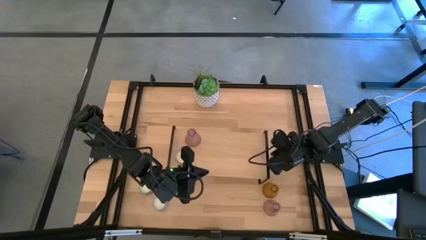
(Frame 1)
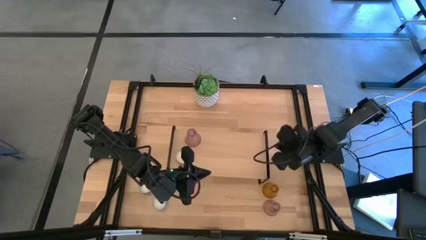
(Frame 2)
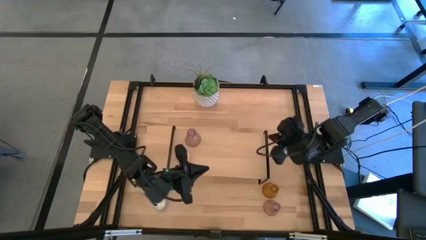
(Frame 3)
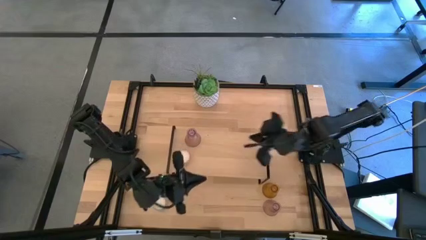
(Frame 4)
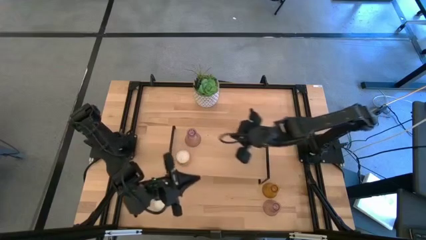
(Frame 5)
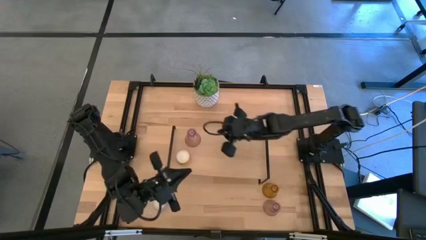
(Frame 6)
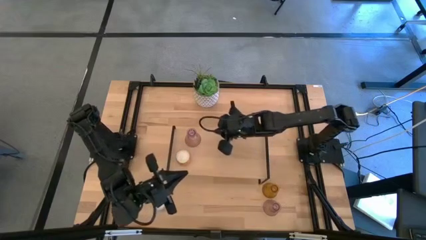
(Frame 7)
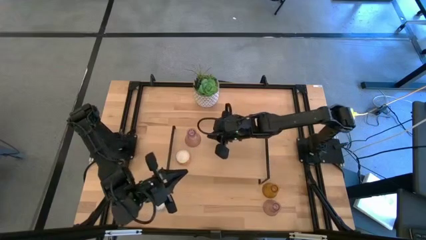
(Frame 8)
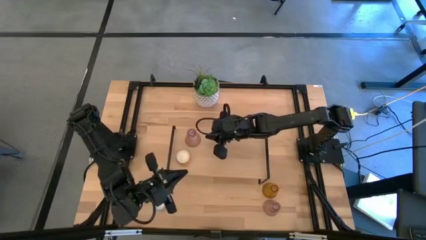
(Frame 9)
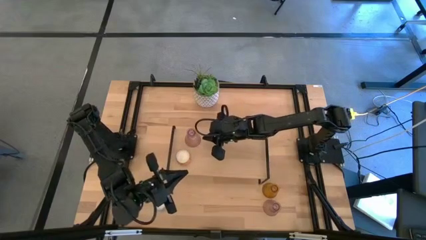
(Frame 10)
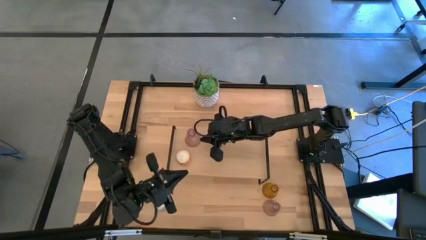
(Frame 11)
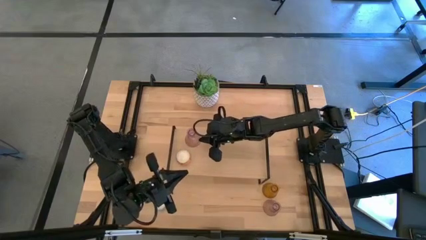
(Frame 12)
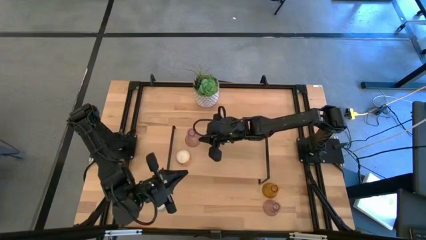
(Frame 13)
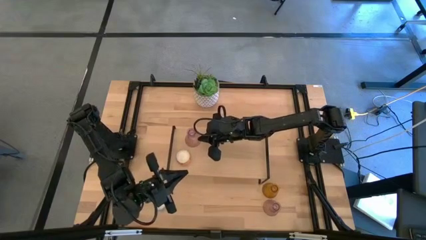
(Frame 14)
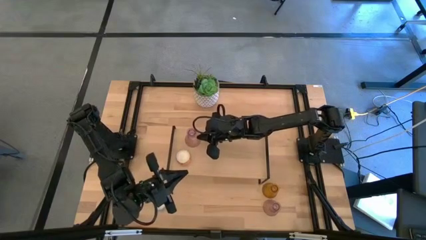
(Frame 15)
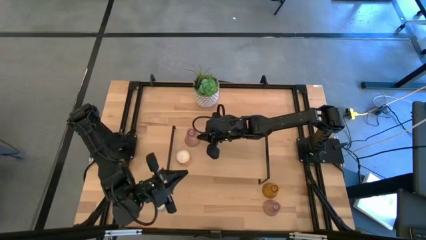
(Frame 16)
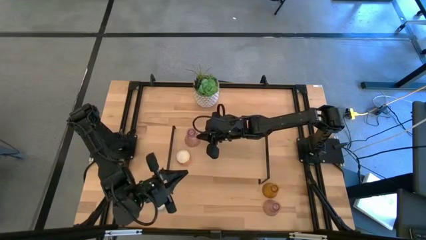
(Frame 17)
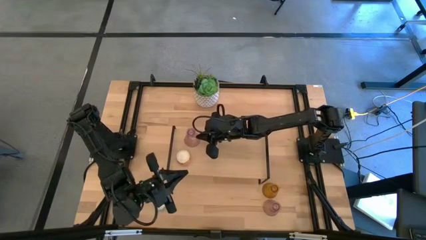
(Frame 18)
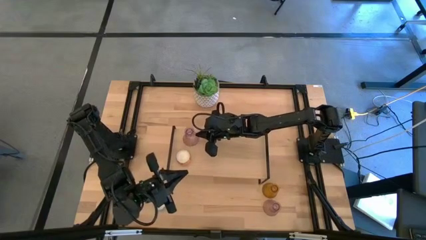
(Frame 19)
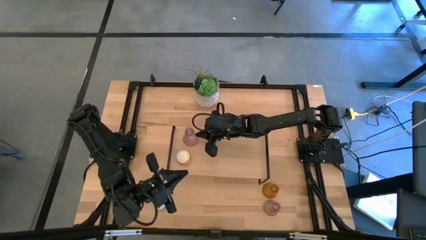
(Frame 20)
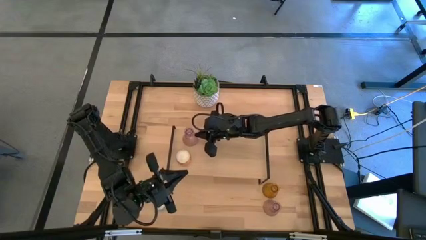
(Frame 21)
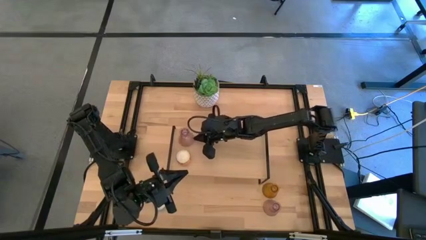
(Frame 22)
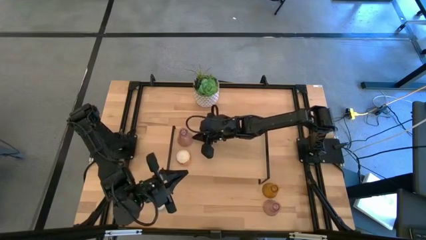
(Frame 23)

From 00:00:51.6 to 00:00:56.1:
Task: Pick & Place candle stick holders
Adjust the pink glass handle holder

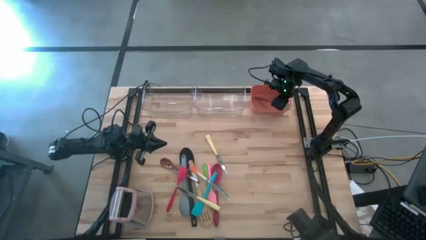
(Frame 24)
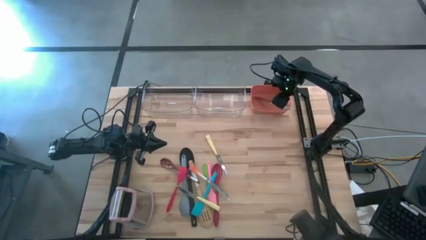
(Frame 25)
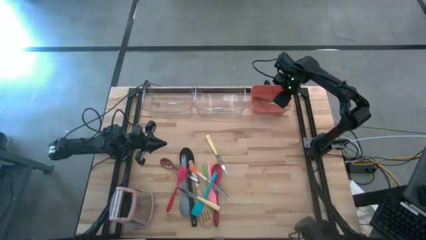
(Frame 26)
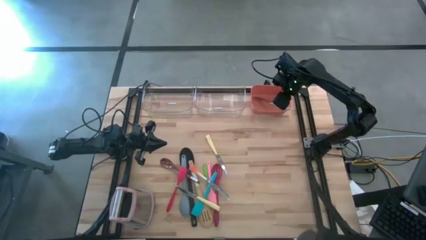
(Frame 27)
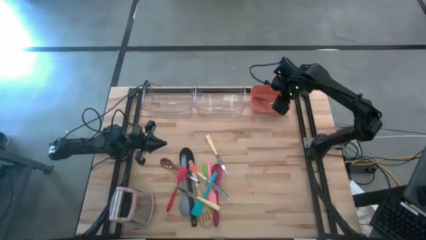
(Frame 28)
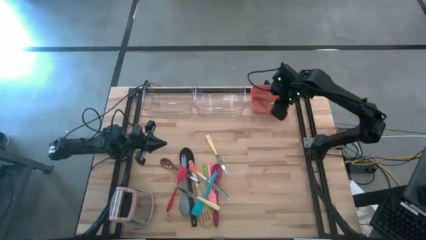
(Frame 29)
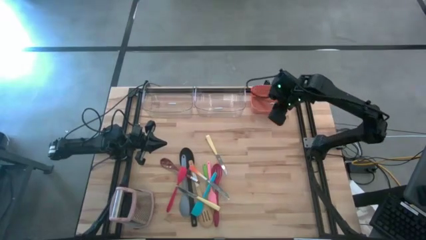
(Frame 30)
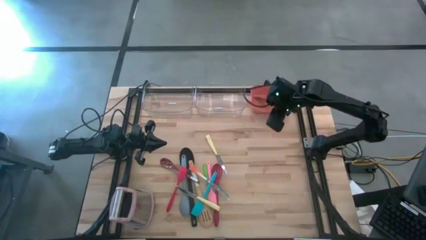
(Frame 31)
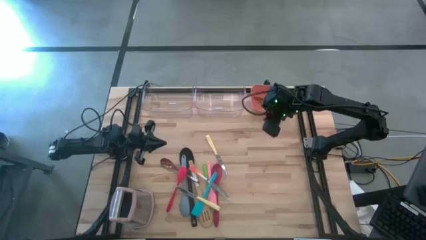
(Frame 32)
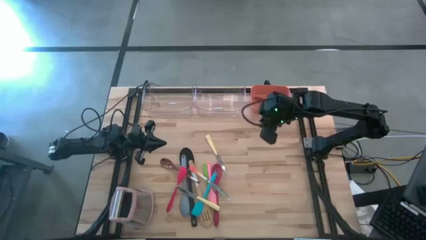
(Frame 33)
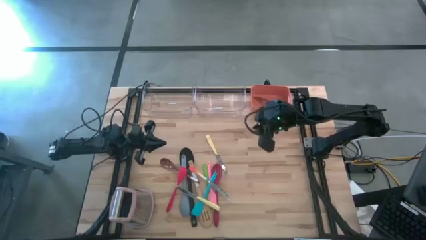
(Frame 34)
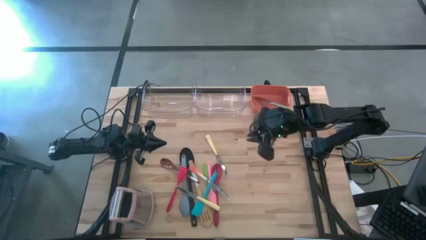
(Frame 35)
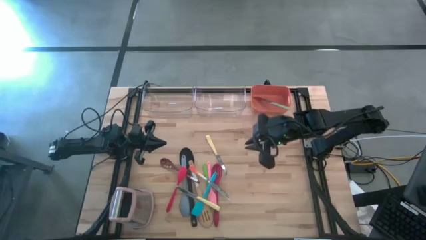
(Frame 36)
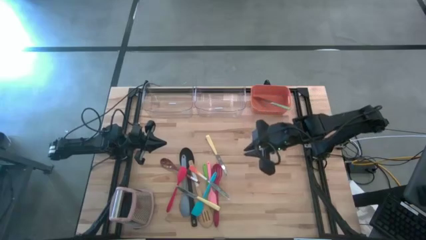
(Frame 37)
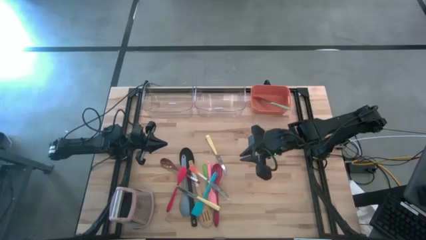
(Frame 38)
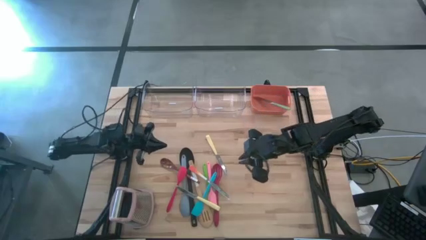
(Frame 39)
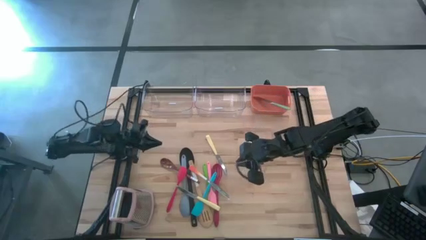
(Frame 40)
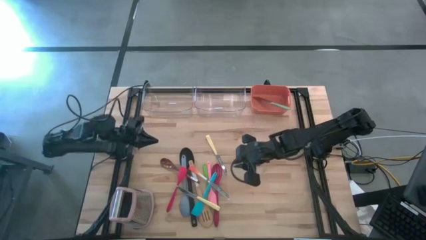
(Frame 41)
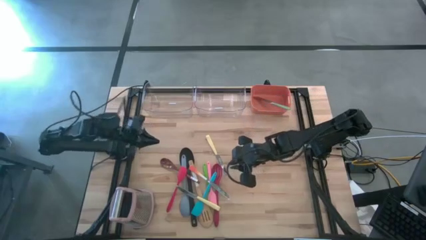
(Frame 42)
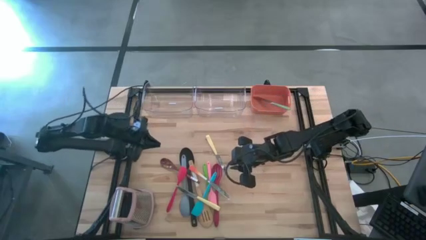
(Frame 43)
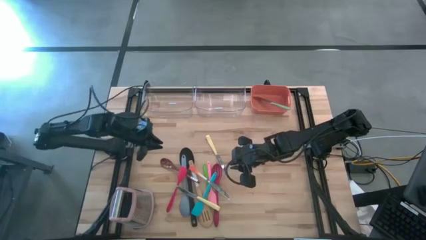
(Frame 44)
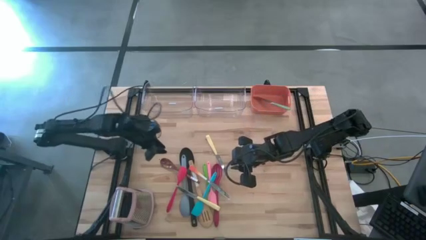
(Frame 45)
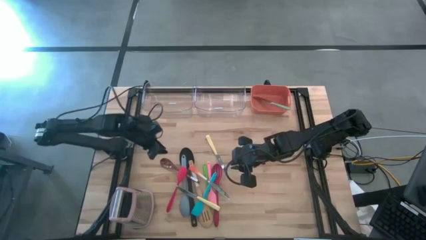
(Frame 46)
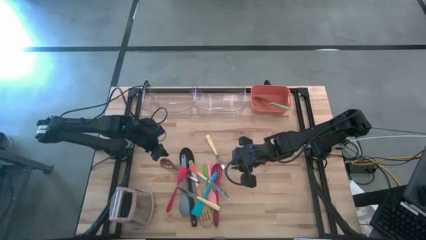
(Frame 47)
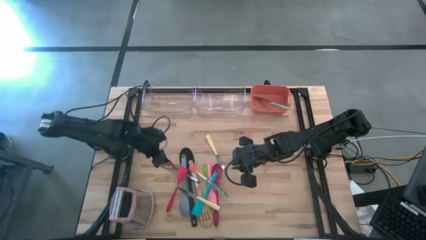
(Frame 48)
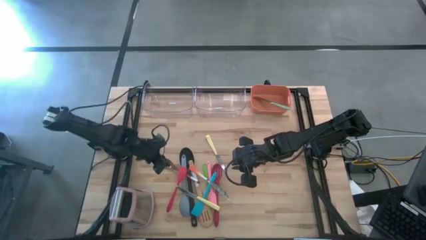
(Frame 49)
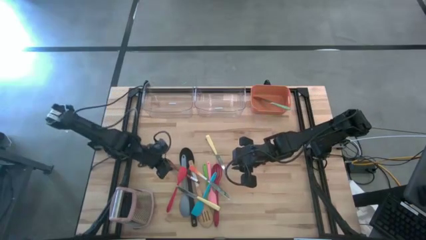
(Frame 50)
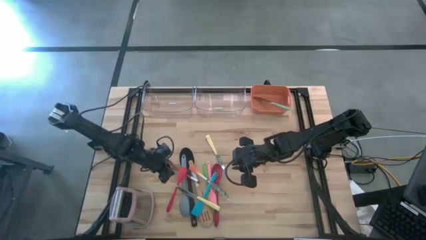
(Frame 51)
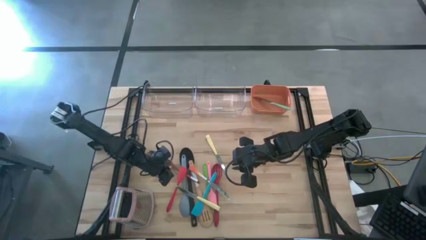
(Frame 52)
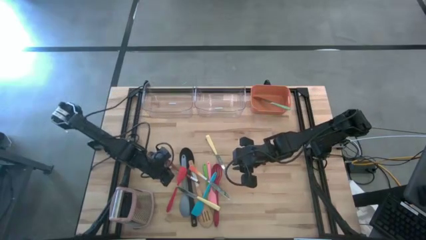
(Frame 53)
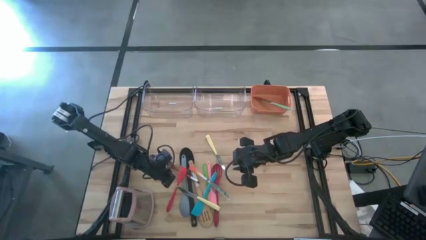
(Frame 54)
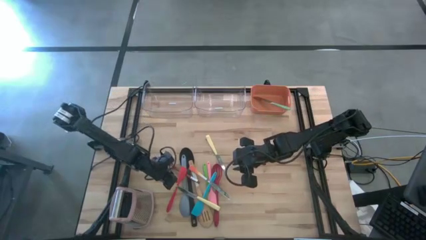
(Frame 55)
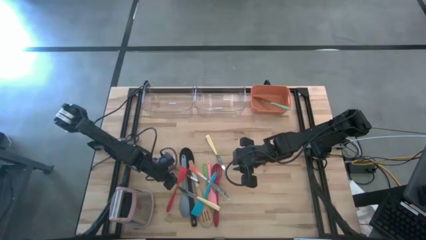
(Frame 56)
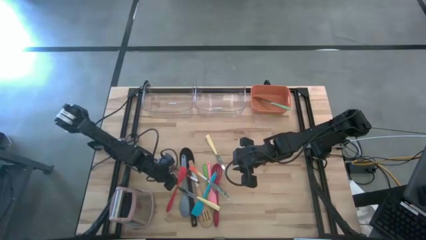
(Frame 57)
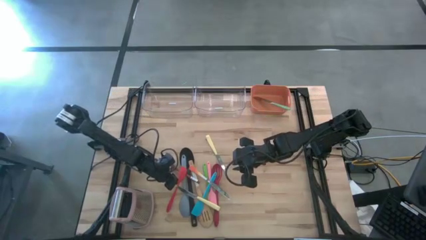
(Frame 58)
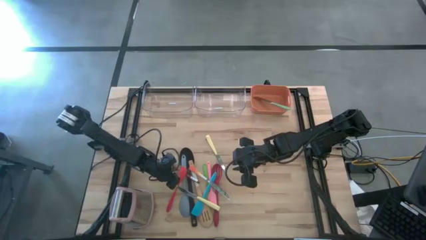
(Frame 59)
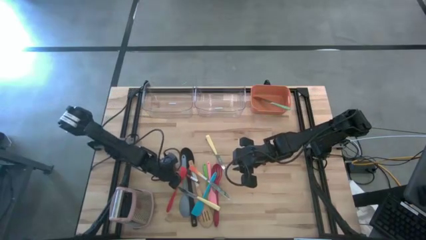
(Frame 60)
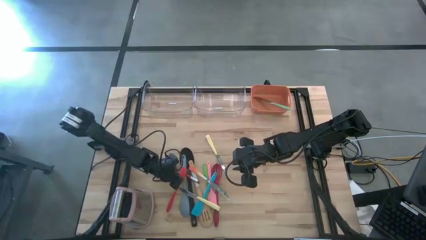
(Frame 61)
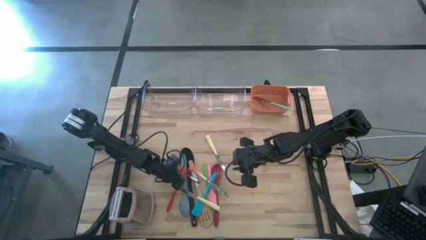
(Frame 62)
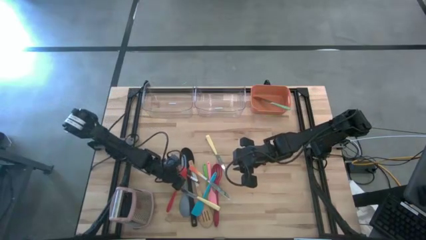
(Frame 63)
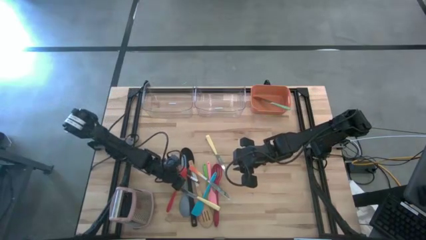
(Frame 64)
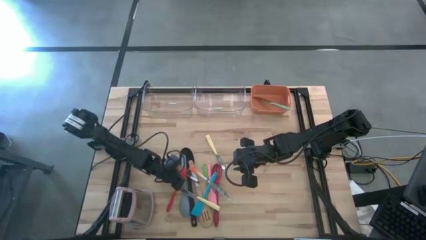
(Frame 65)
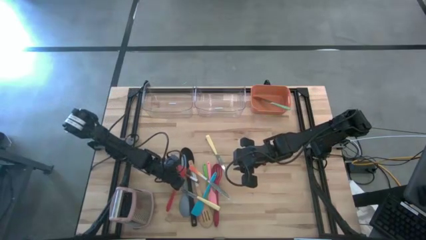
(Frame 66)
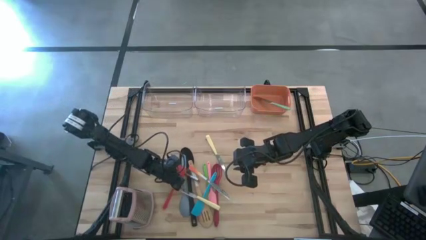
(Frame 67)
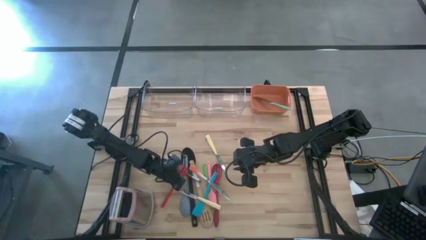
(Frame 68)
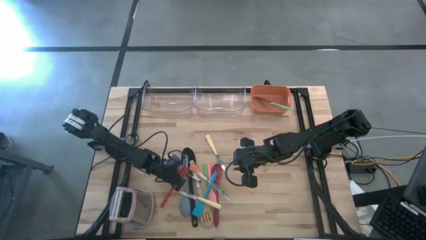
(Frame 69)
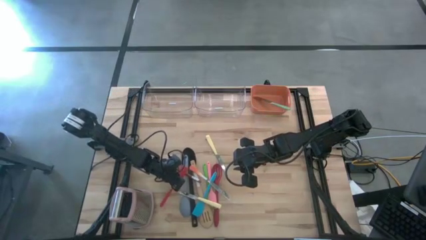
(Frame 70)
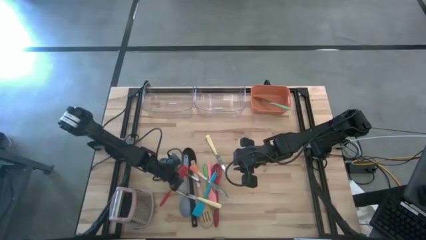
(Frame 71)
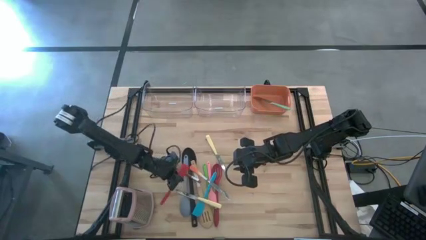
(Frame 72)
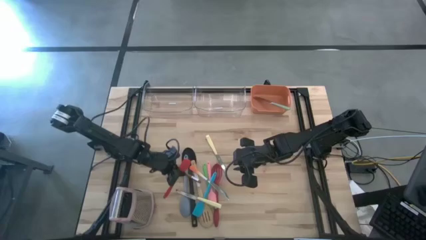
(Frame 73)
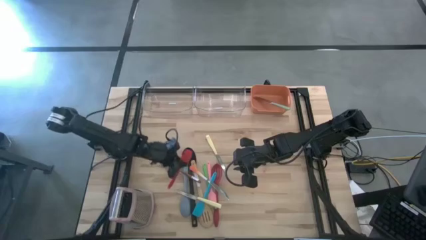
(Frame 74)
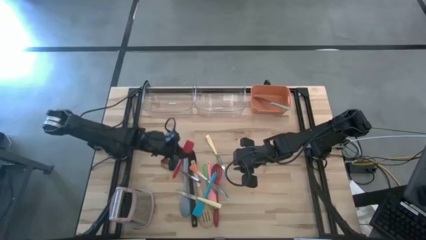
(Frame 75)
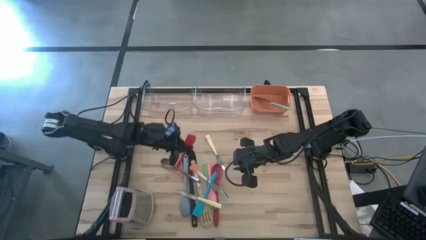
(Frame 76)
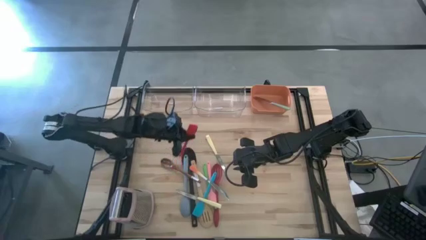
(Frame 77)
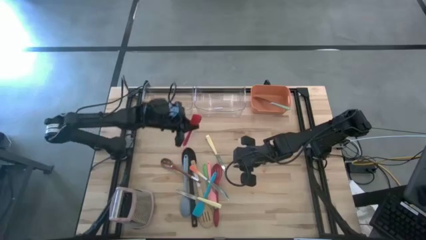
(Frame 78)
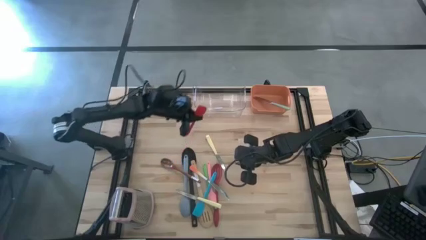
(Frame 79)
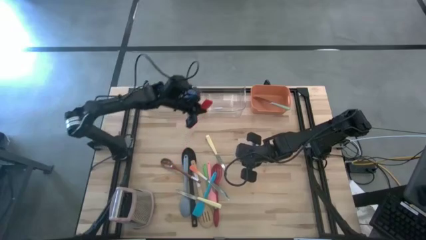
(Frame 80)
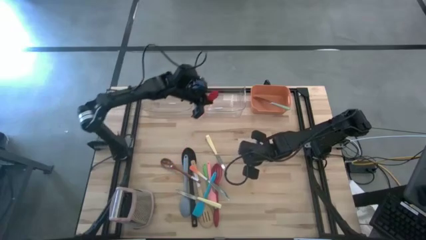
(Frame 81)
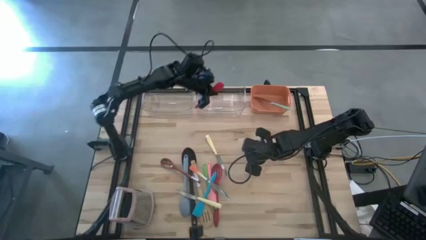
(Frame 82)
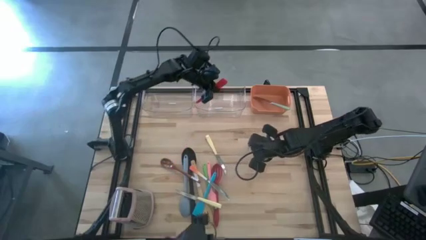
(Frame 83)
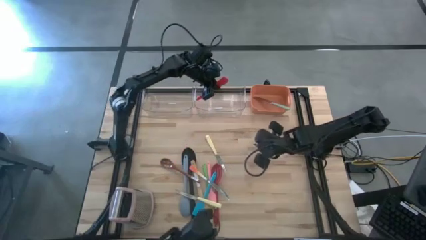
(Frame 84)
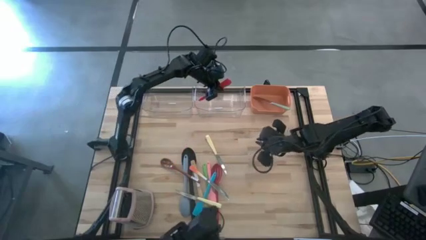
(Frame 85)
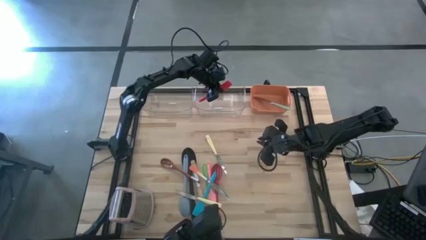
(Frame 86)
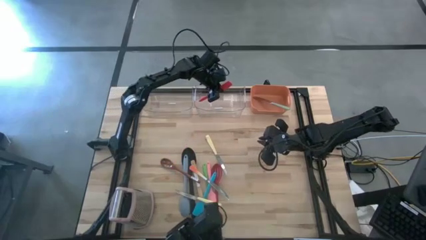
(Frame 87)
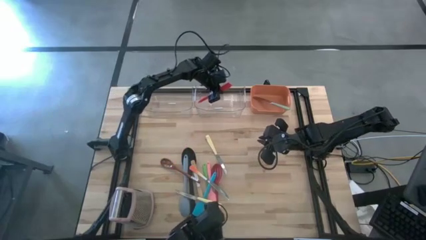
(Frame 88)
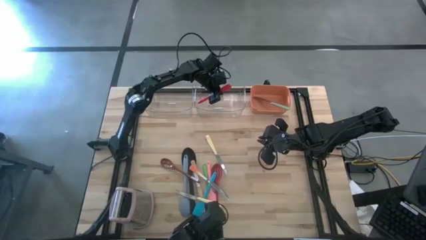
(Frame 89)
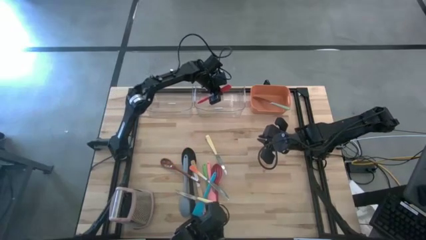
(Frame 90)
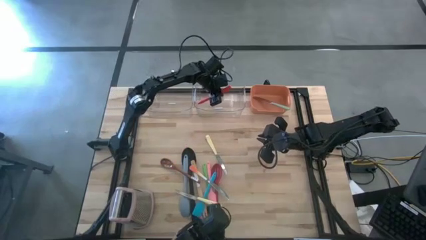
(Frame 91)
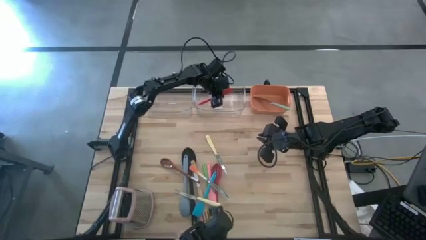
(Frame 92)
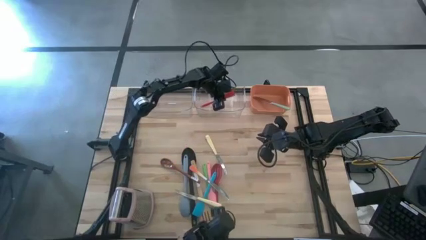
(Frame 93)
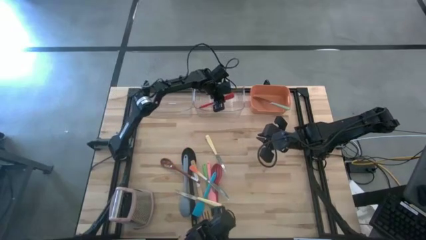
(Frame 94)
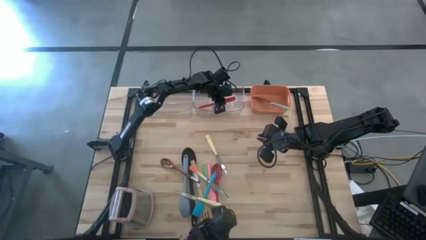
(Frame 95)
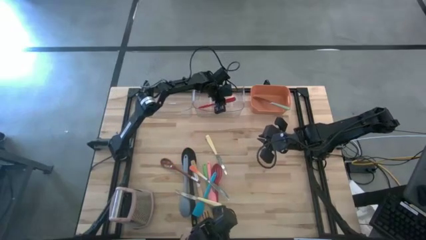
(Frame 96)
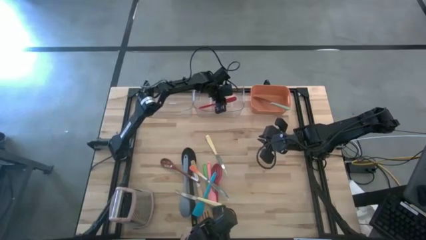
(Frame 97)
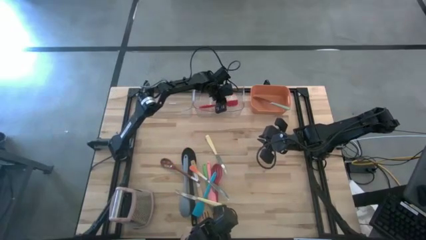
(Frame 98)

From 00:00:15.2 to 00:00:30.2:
Task: Pick & Place Kitchen Items
Put the red spatula into the right transparent bin
